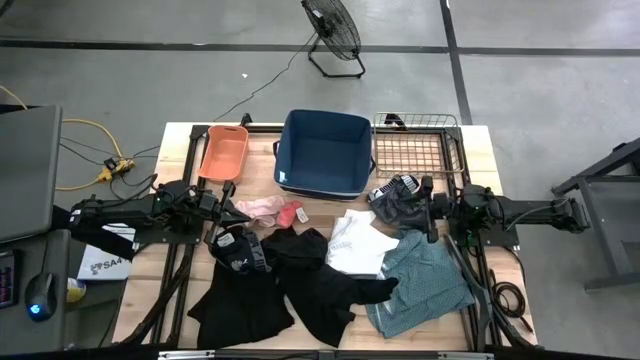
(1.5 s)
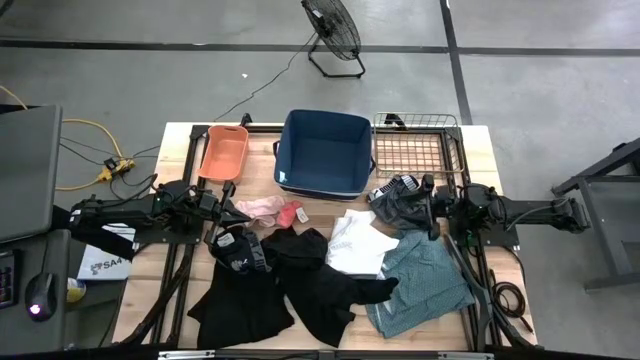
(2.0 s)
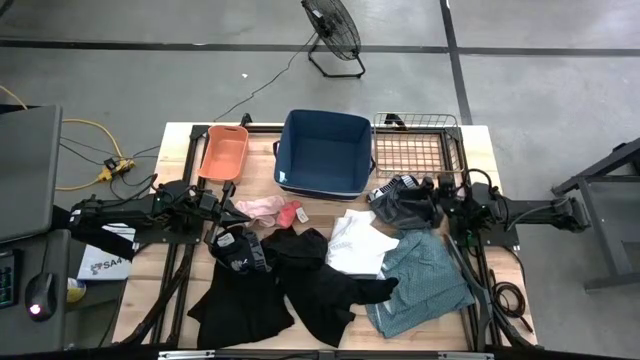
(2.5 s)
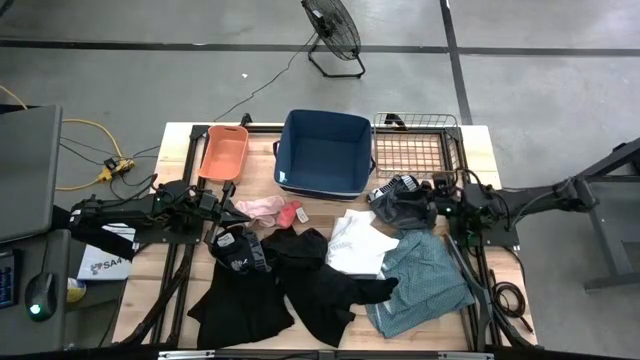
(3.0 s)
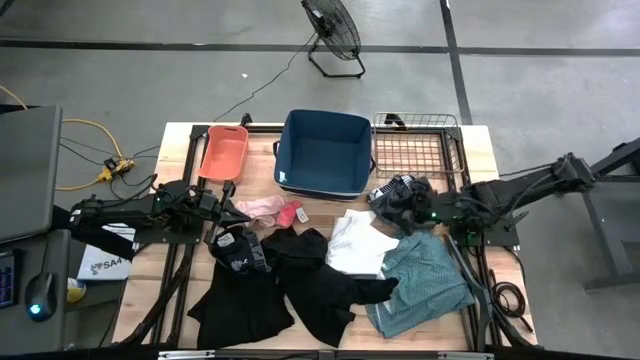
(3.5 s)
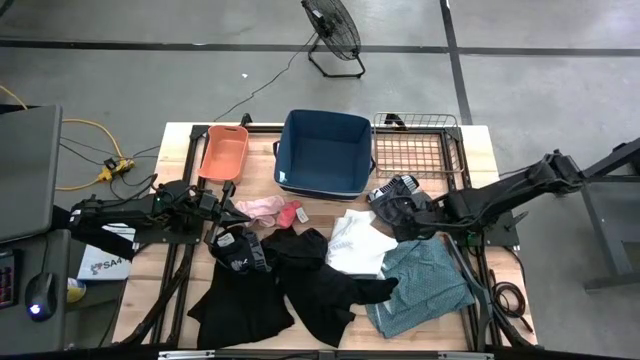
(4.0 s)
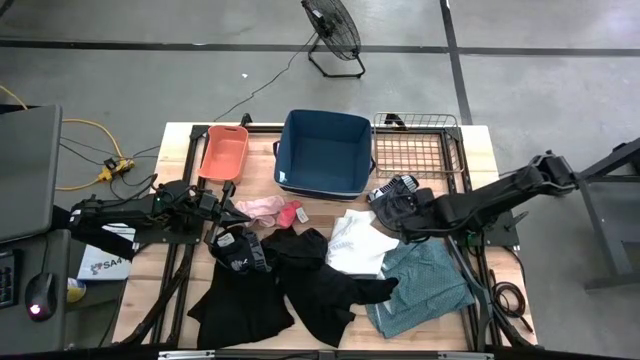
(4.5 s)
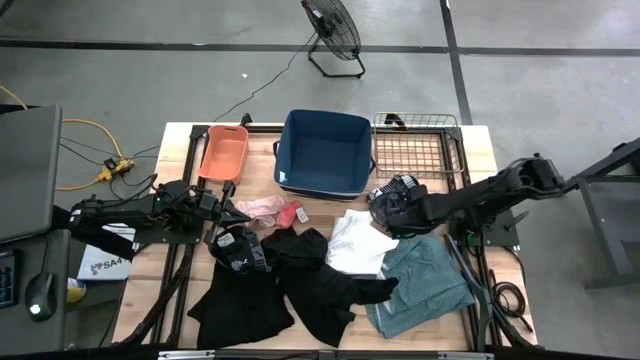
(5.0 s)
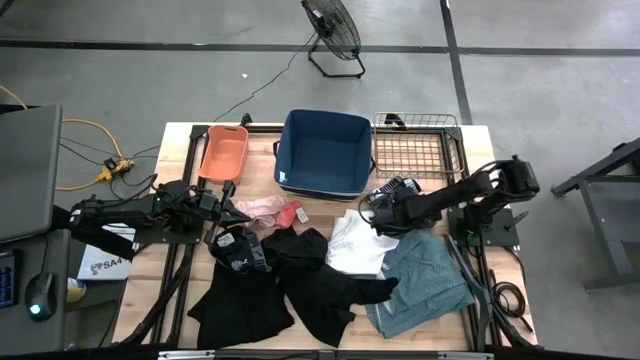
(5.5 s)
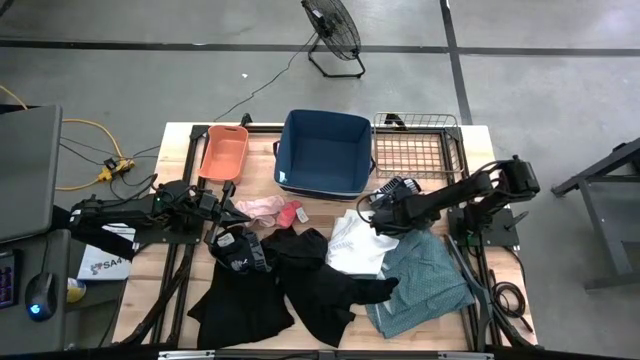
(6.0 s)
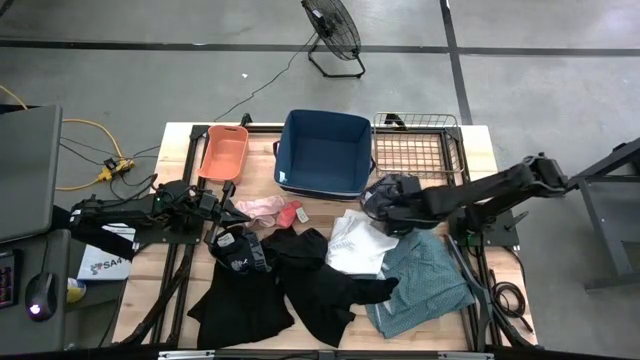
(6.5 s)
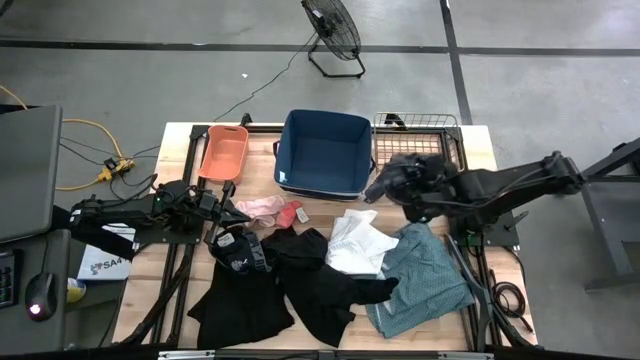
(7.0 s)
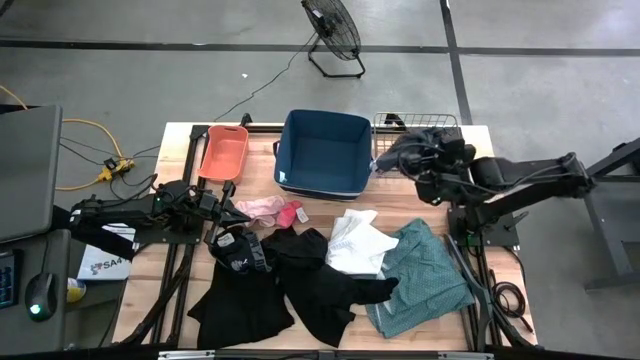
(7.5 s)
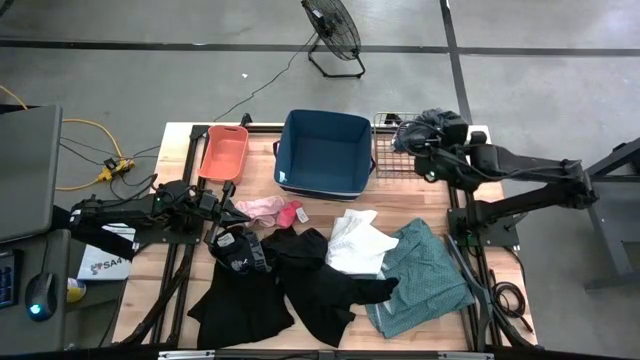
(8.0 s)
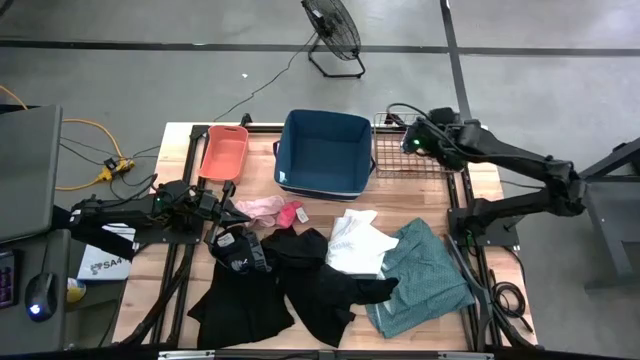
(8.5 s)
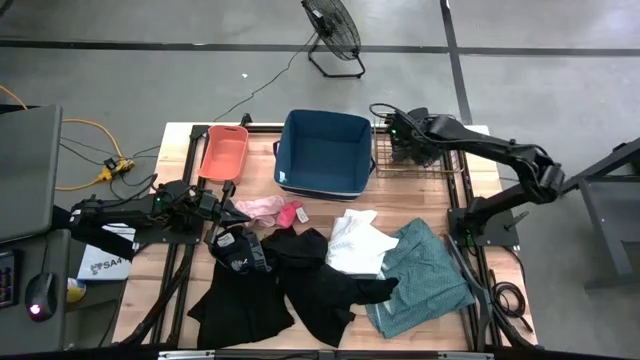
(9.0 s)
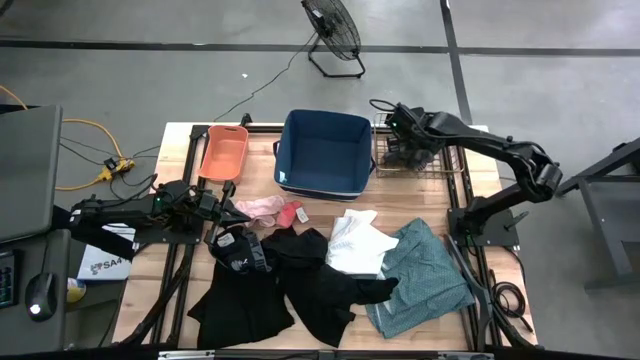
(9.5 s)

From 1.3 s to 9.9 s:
Task: Pick & Place Cloths
Put the gray boxer into the gold wire basket

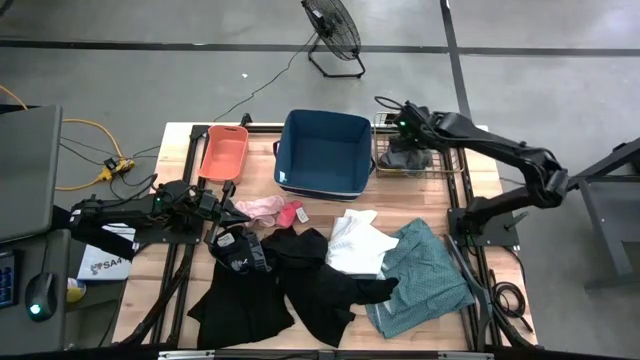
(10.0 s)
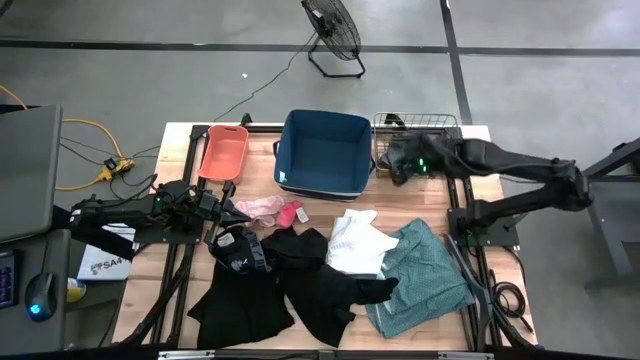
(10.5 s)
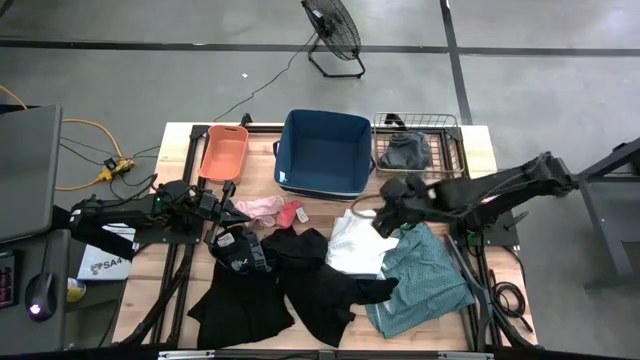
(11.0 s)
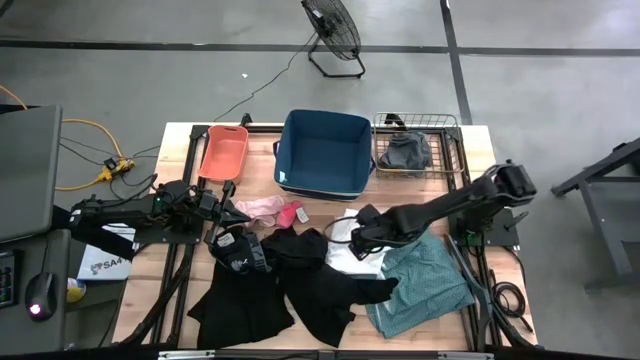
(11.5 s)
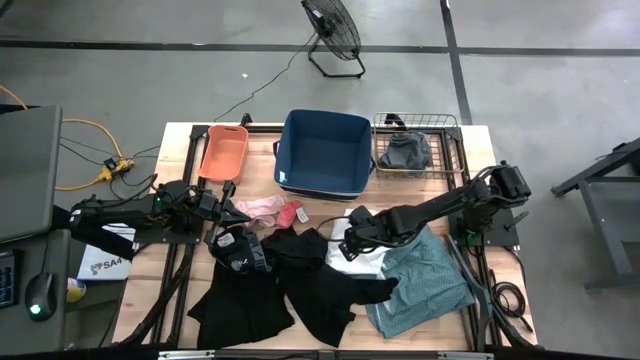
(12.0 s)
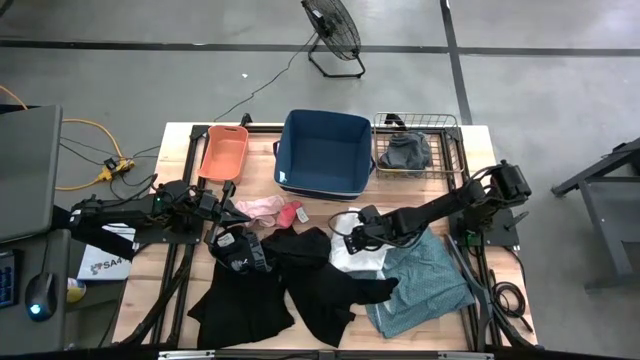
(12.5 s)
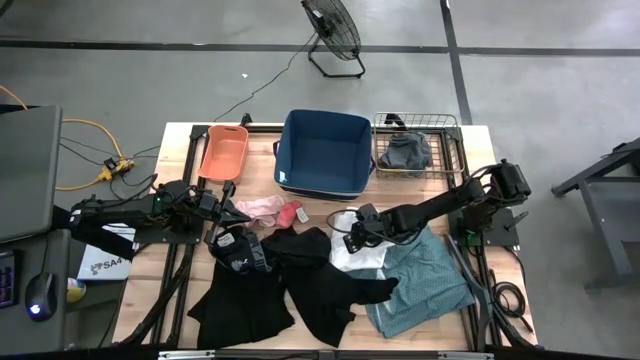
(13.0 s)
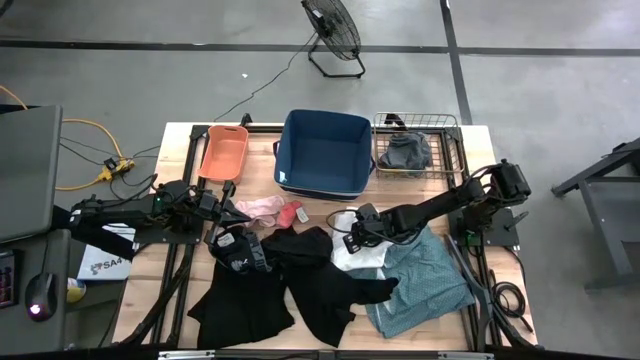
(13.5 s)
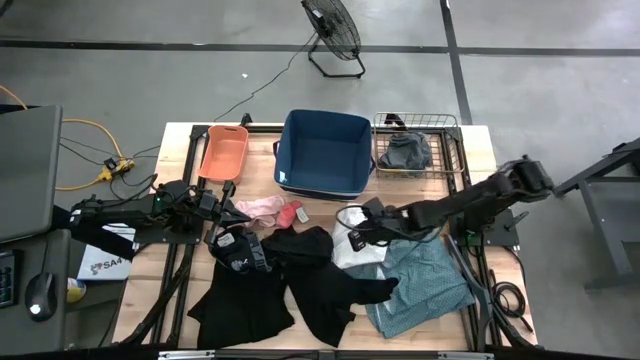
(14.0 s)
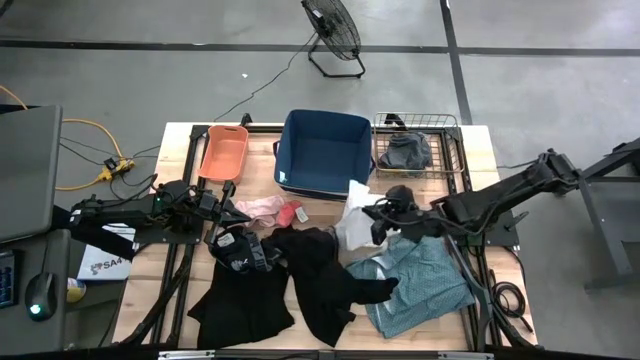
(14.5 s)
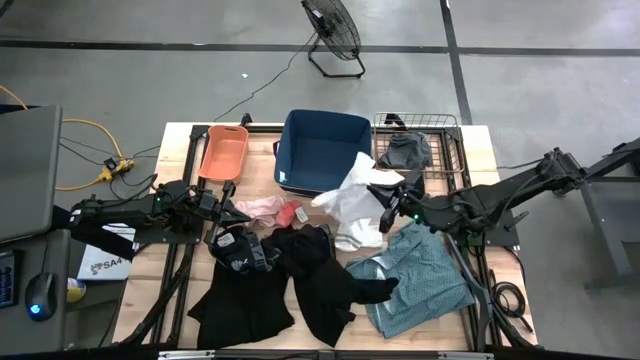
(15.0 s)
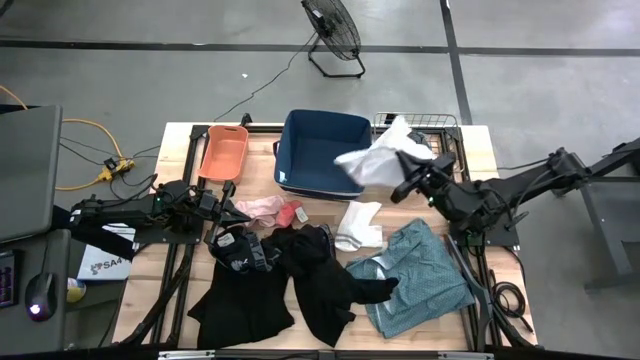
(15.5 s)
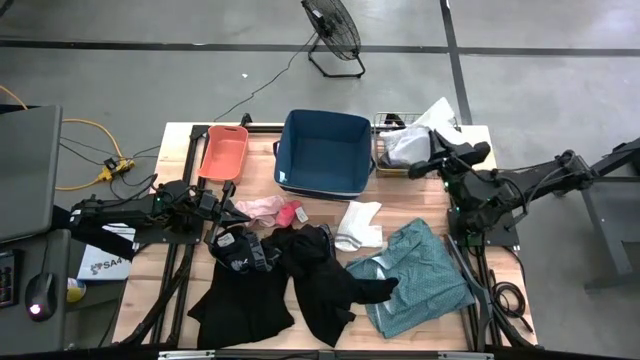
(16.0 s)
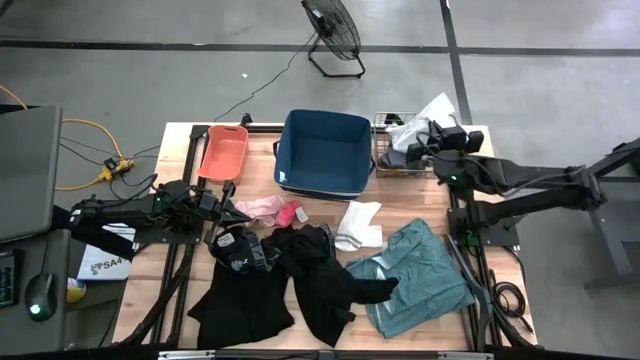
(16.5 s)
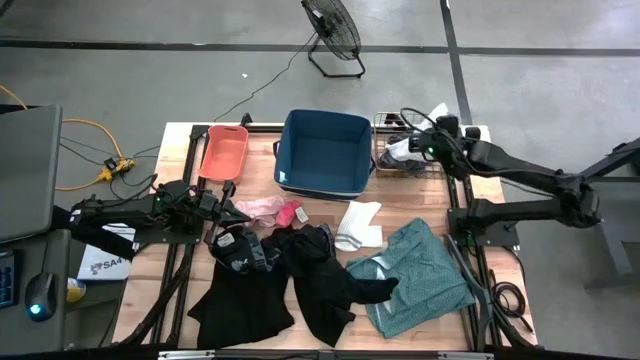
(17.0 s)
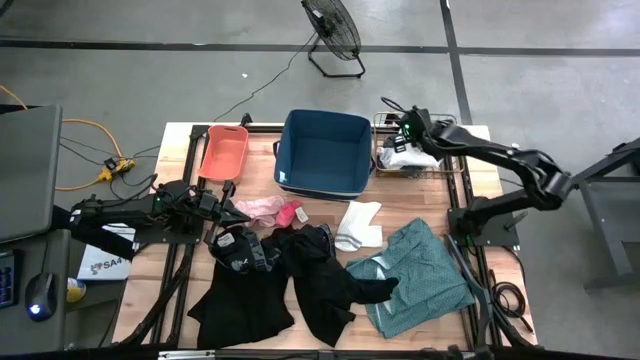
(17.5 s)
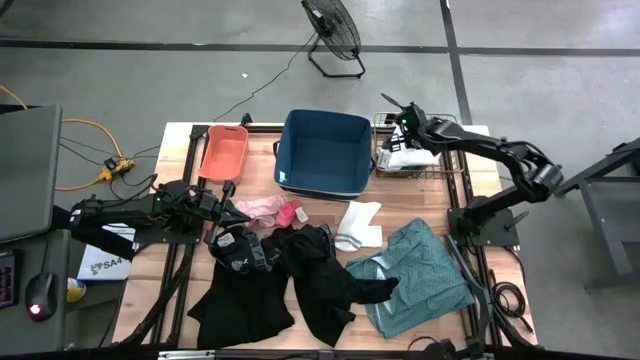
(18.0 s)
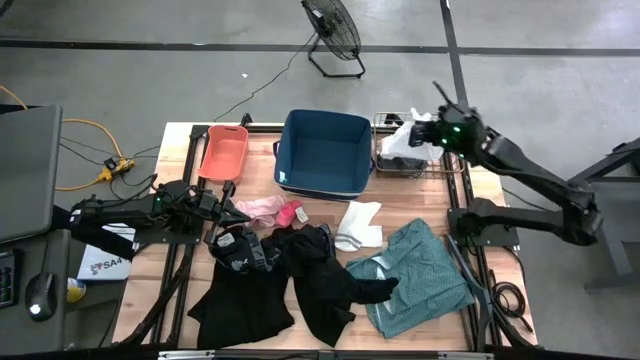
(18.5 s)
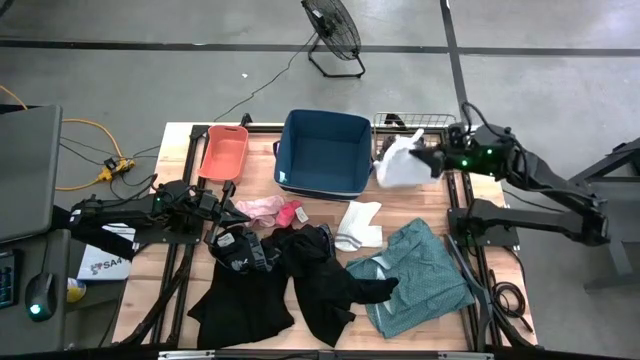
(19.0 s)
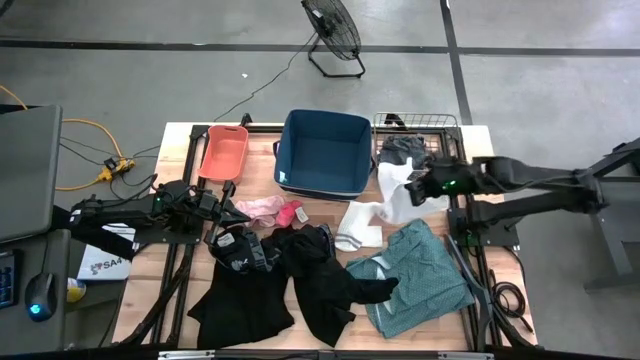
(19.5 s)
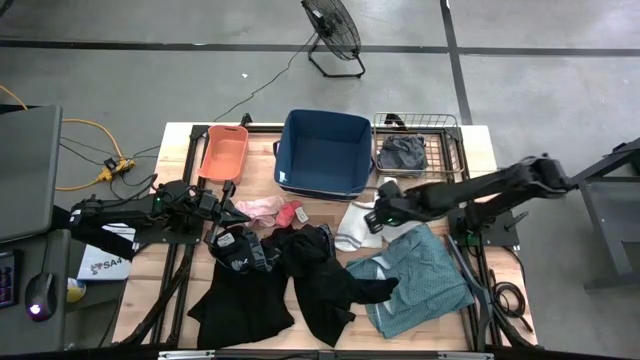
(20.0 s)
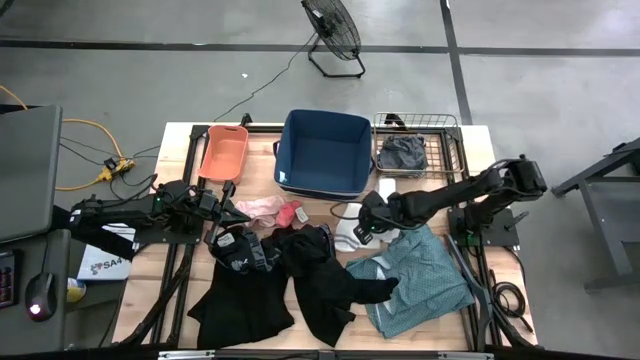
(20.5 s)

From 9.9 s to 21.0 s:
Put the blue sock into the orange bin

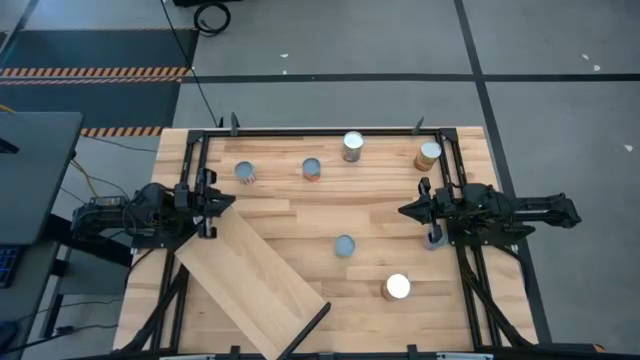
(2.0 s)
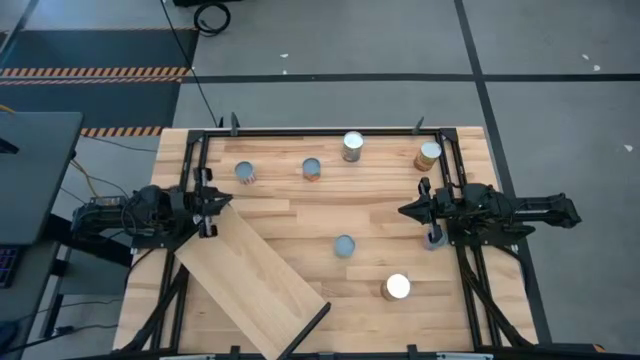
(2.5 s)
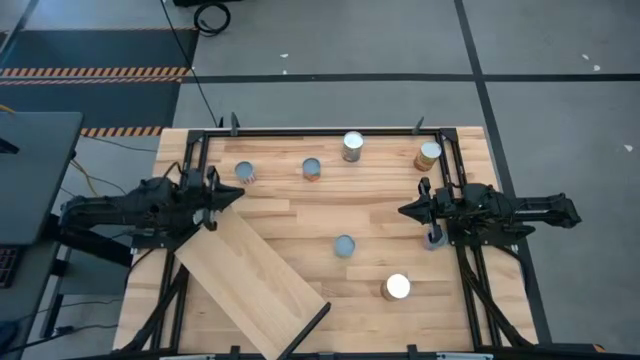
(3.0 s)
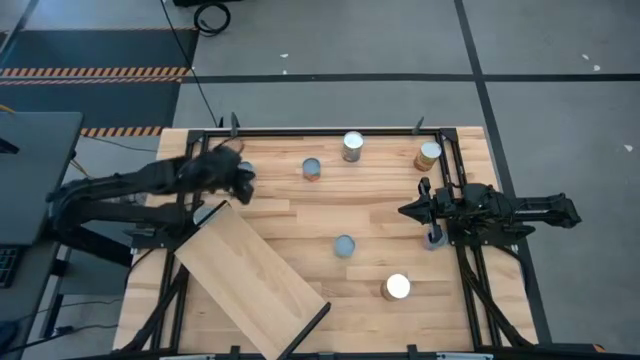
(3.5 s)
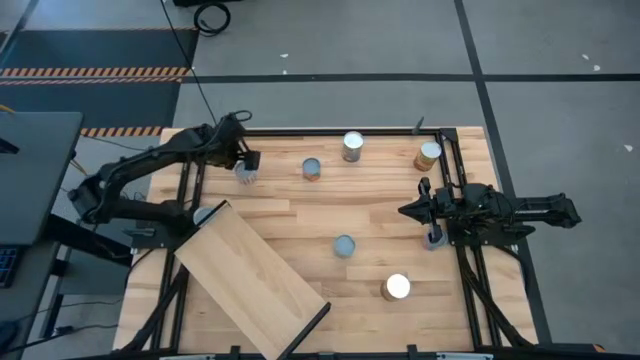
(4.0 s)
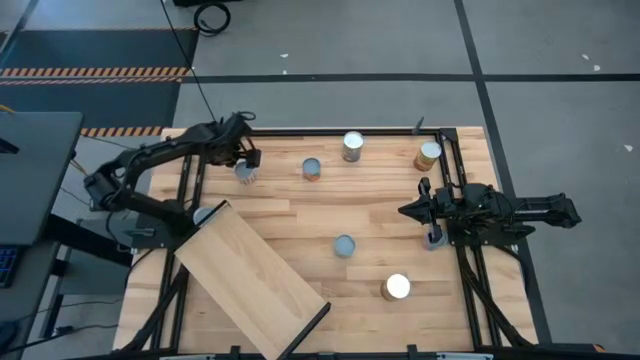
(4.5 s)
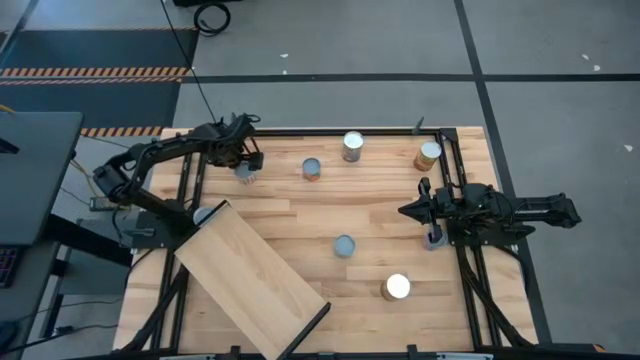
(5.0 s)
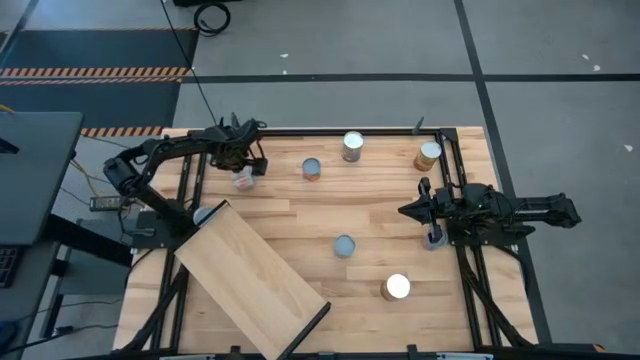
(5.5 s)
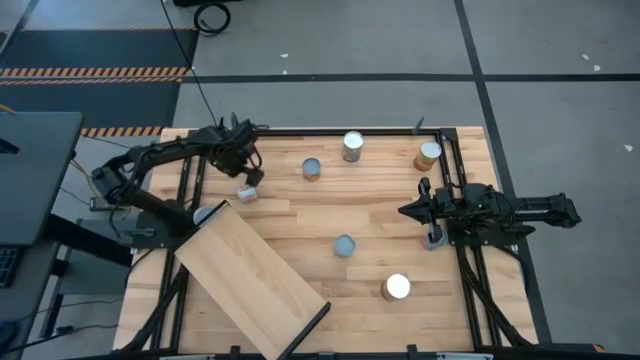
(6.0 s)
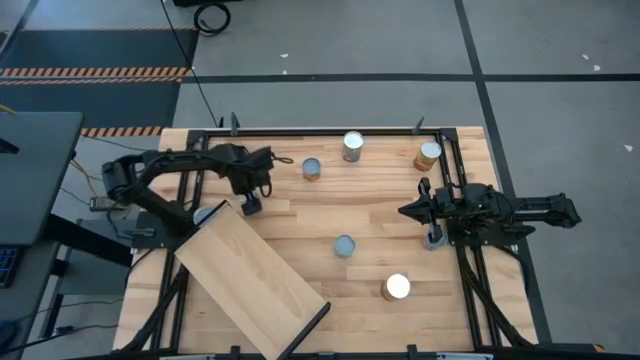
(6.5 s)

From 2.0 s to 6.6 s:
Task: Pick and place cans onto a shelf
Put the canned carrots on the shelf
